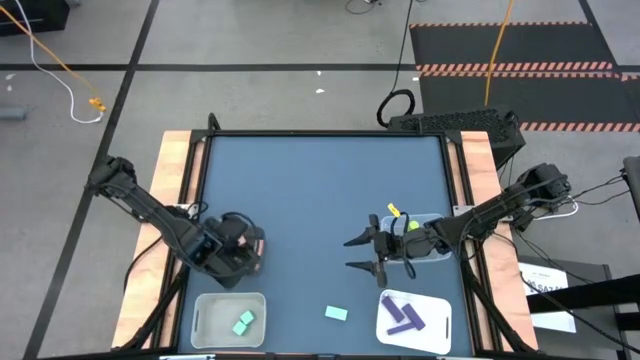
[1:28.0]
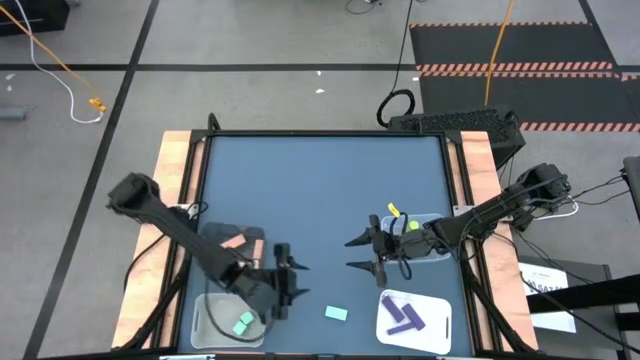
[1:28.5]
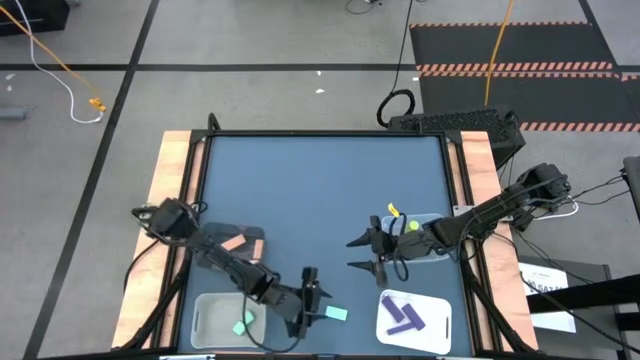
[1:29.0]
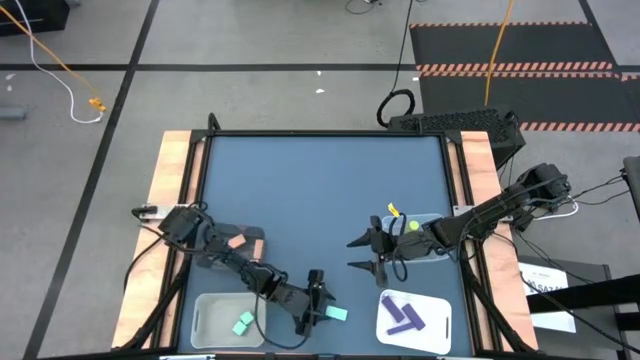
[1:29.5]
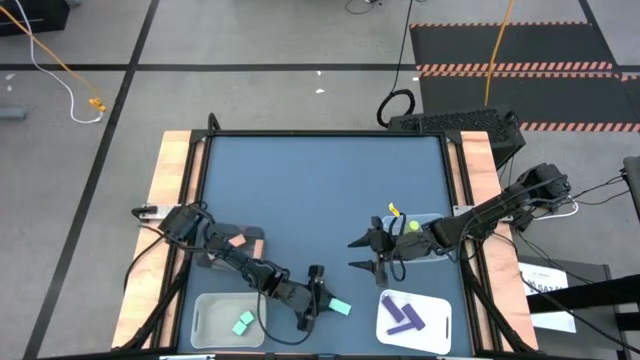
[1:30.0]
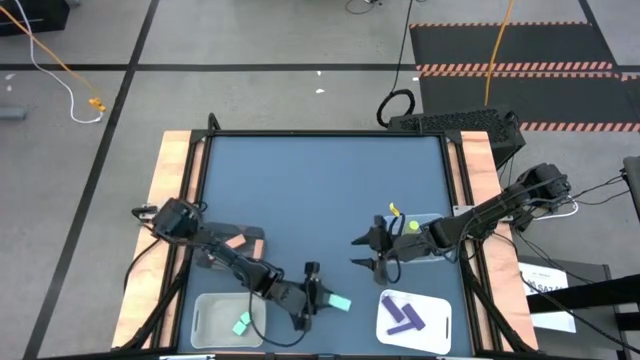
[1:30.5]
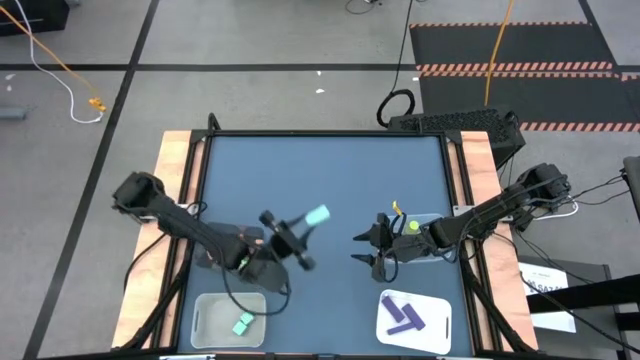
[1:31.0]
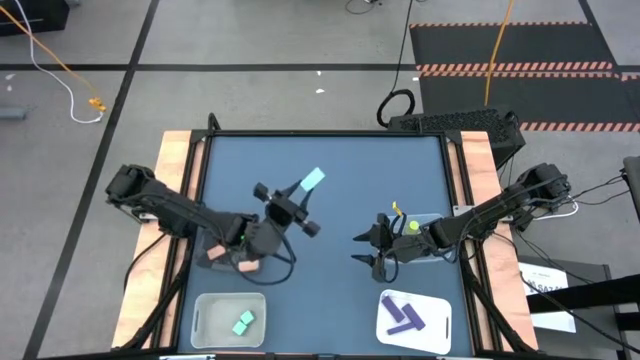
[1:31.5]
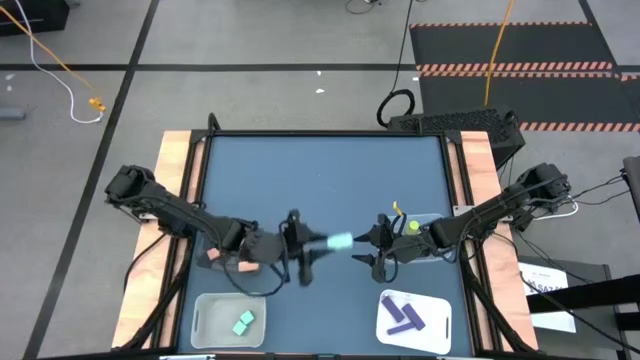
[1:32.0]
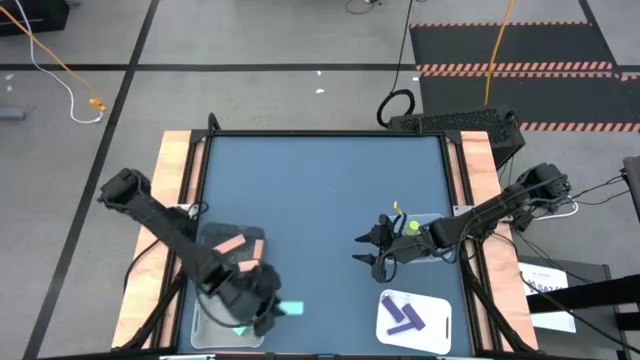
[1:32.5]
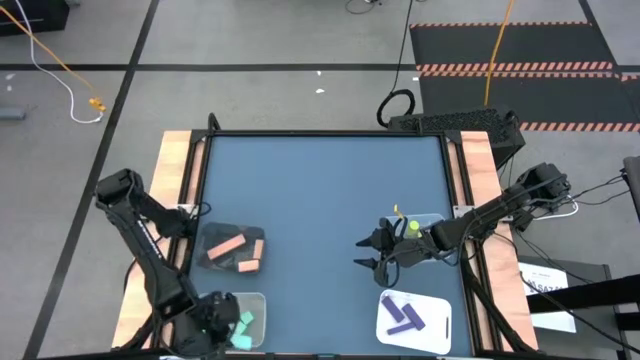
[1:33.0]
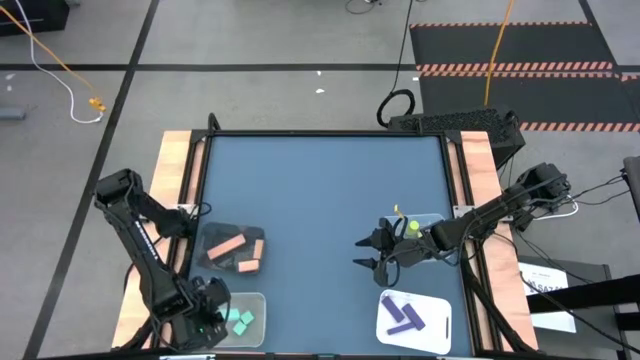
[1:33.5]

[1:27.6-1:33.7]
Task: Sort & place blocks by color
Put the blue block into the gray bin

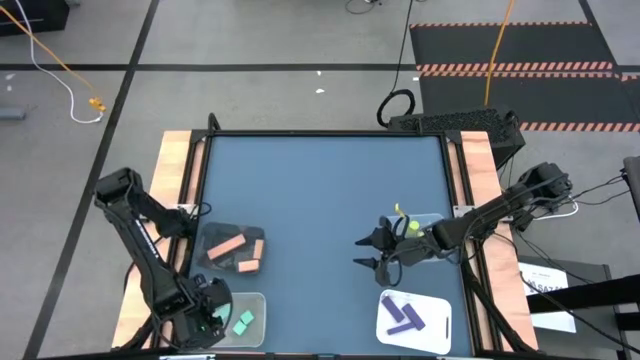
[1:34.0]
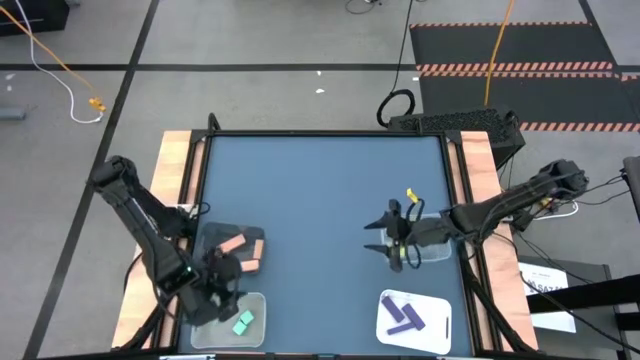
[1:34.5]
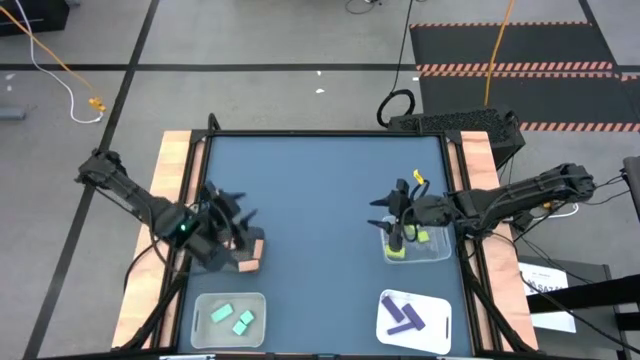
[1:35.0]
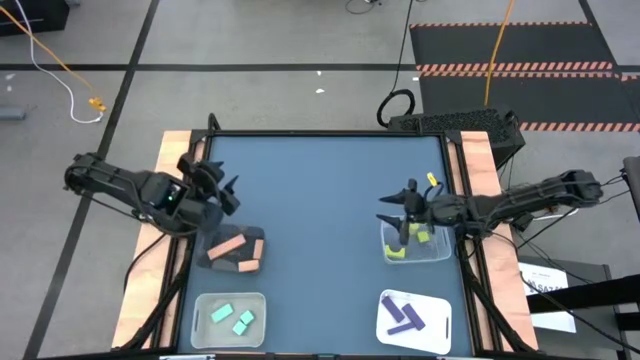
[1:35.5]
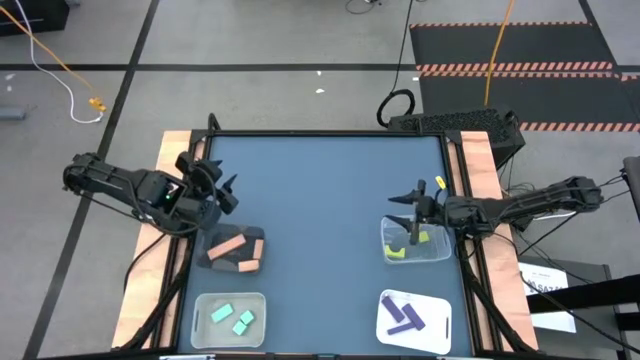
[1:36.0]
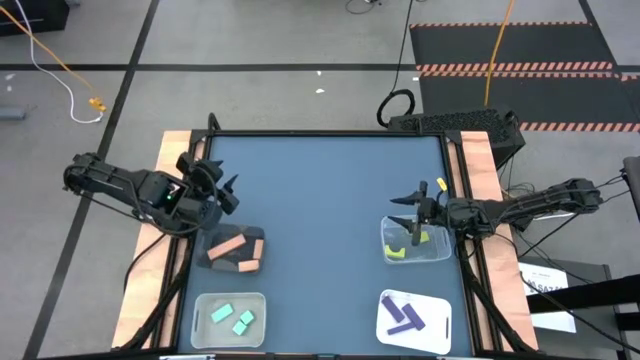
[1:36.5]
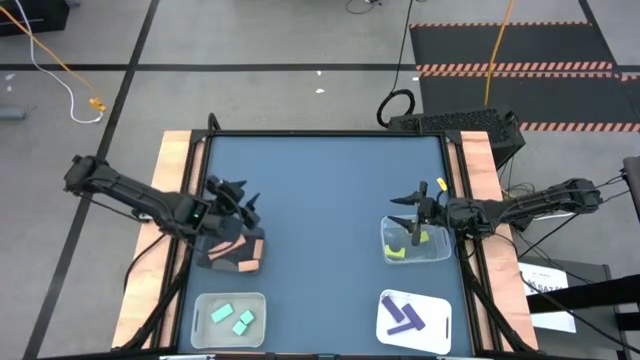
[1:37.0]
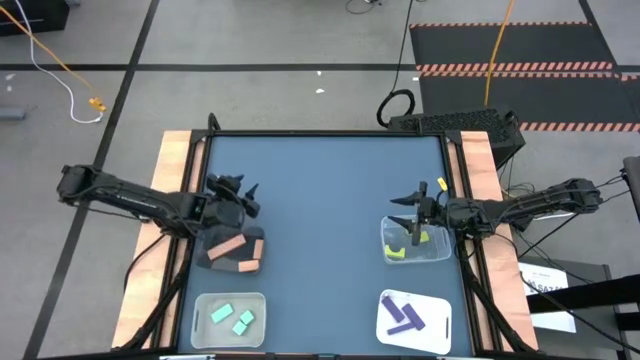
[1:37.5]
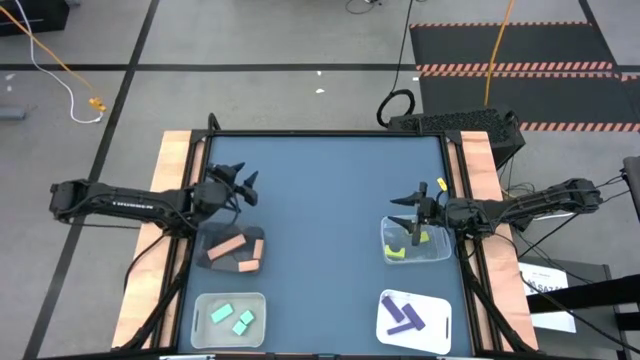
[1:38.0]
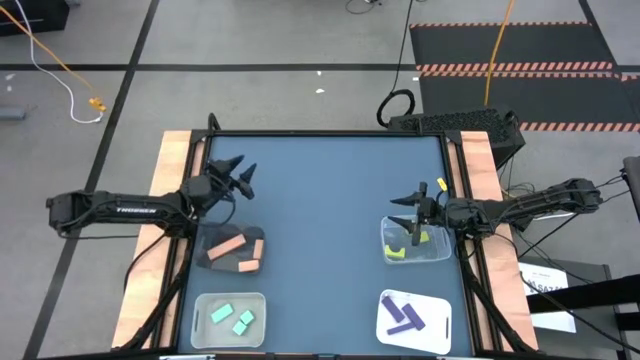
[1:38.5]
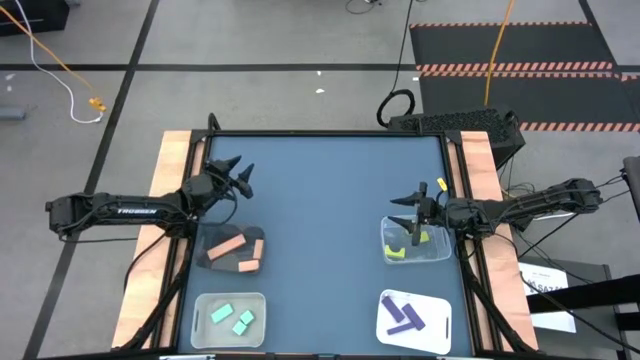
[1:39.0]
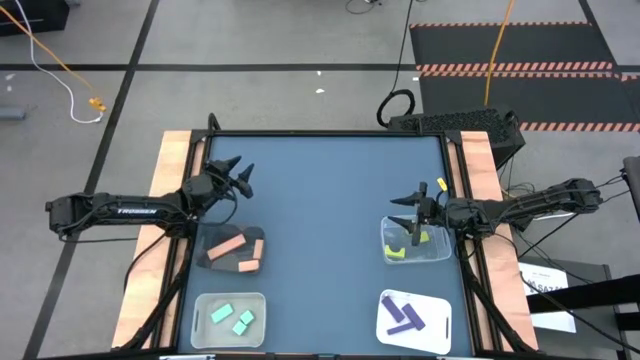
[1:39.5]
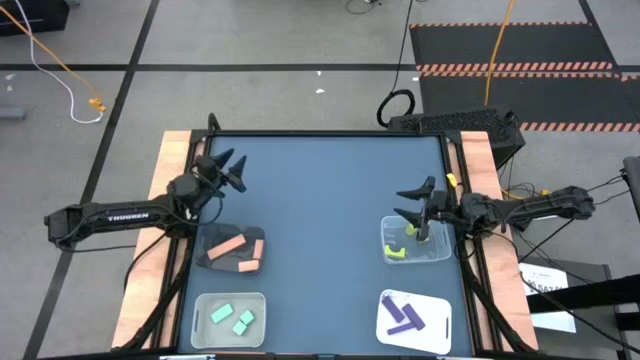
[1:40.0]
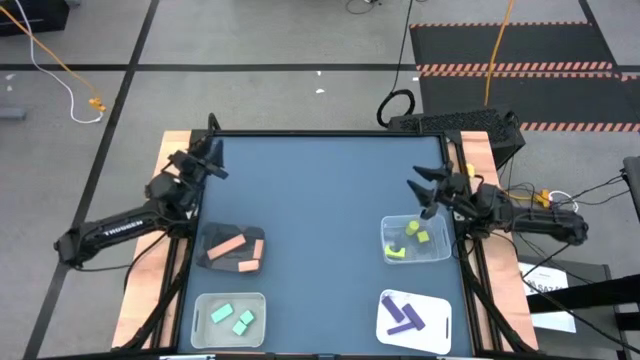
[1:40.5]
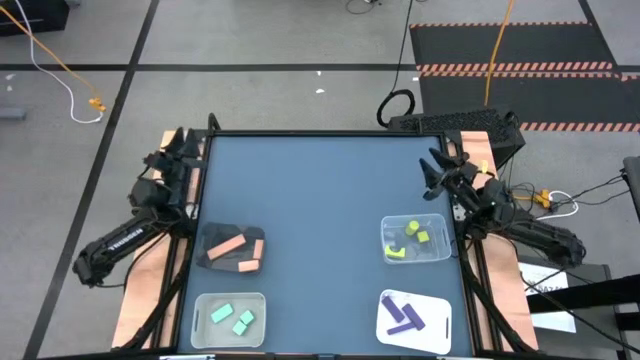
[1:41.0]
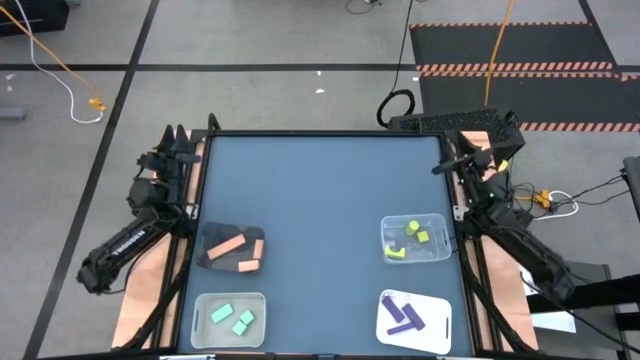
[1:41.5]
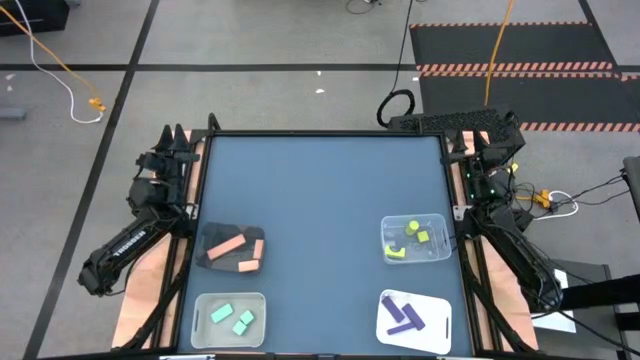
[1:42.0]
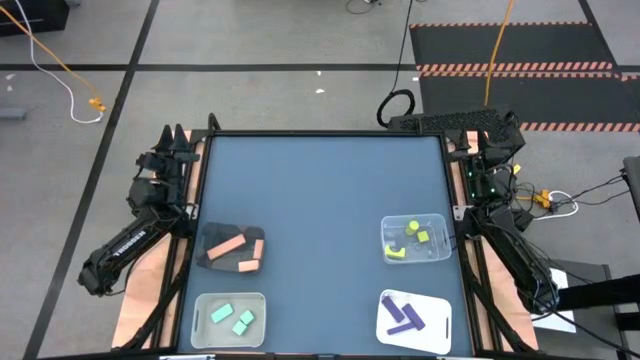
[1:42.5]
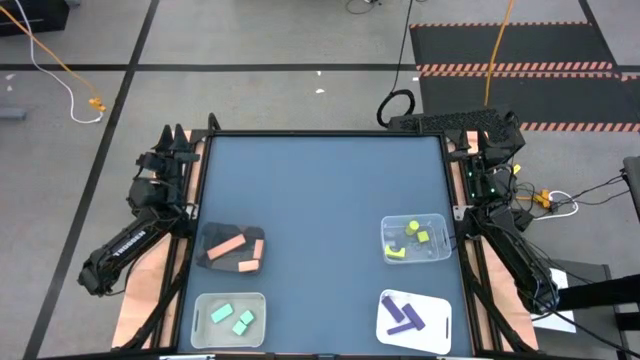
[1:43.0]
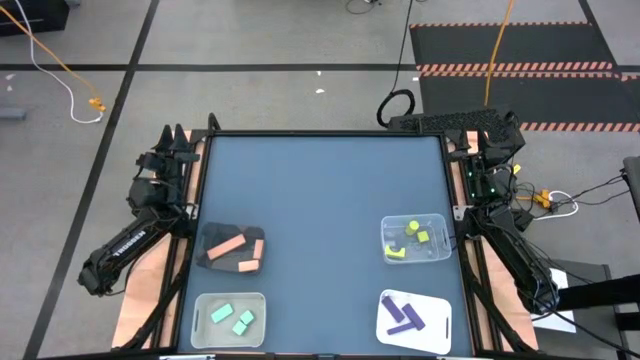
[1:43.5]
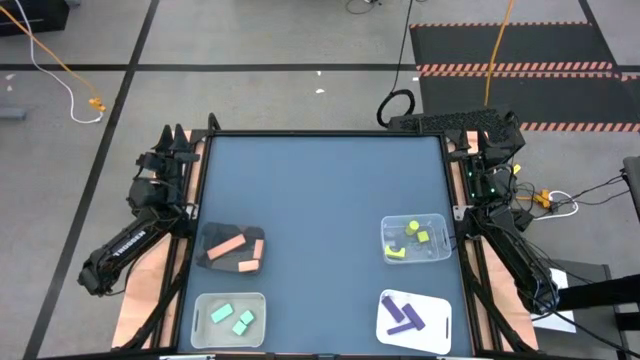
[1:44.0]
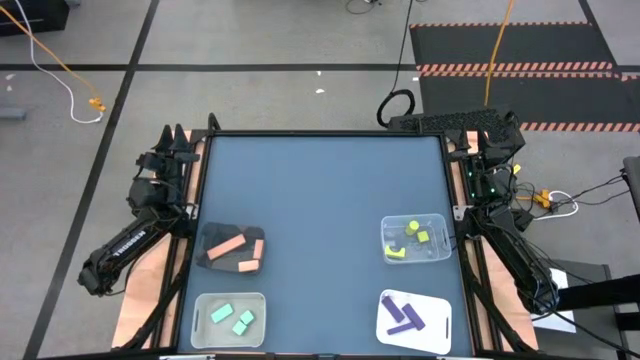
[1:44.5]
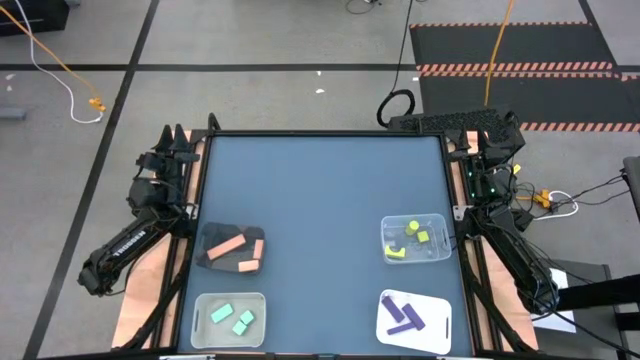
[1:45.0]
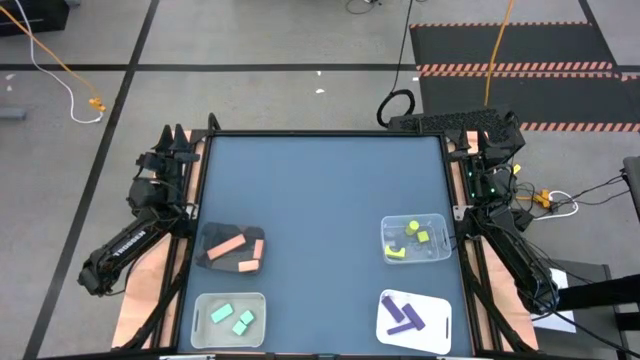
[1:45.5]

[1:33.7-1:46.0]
Return to Home Position

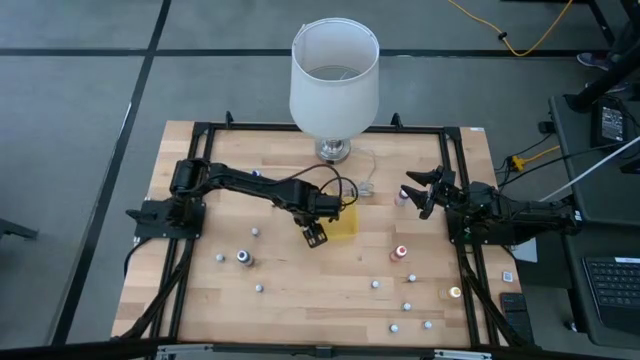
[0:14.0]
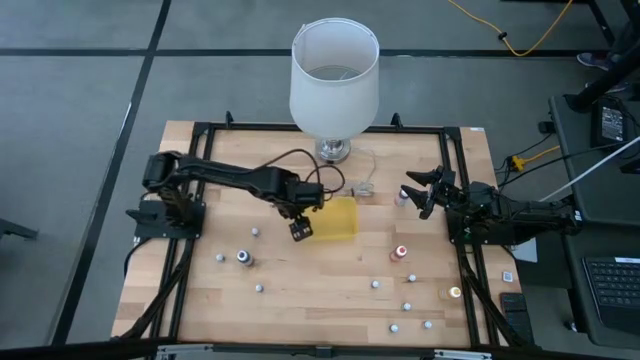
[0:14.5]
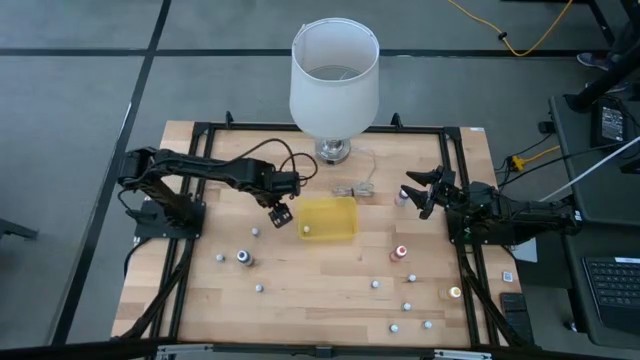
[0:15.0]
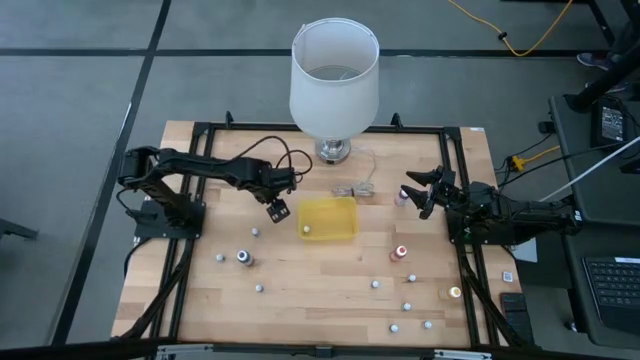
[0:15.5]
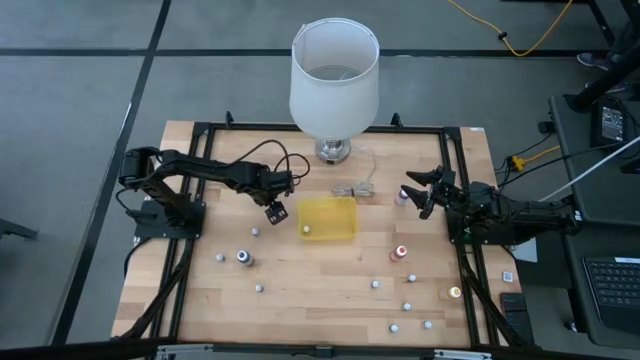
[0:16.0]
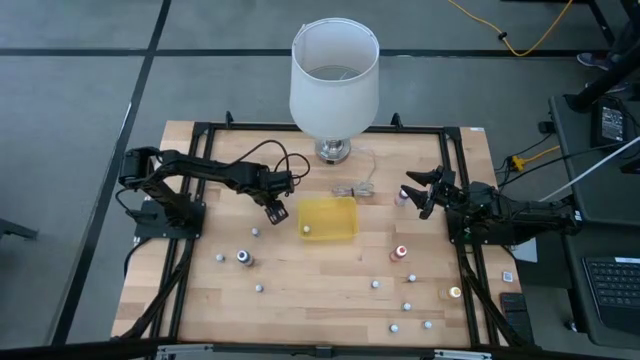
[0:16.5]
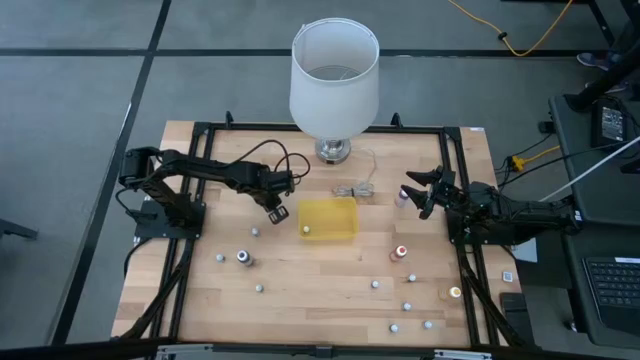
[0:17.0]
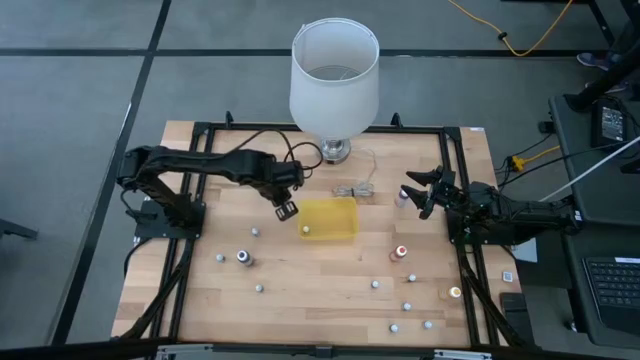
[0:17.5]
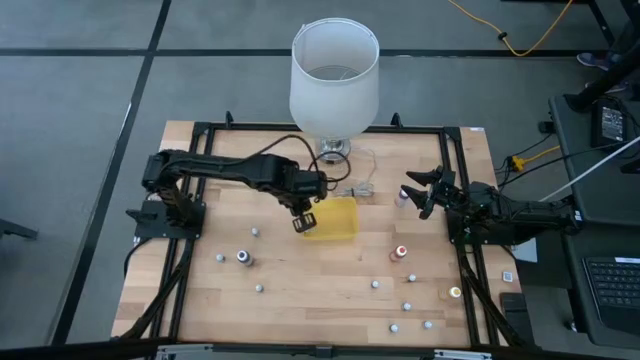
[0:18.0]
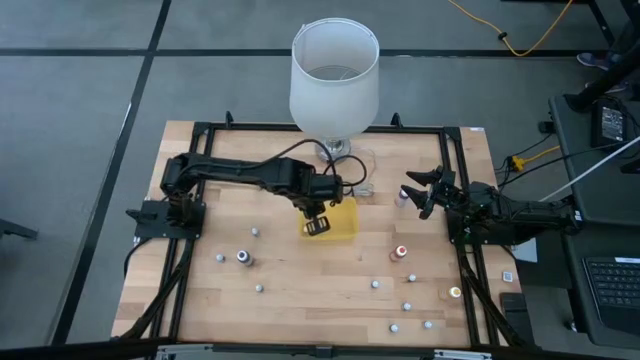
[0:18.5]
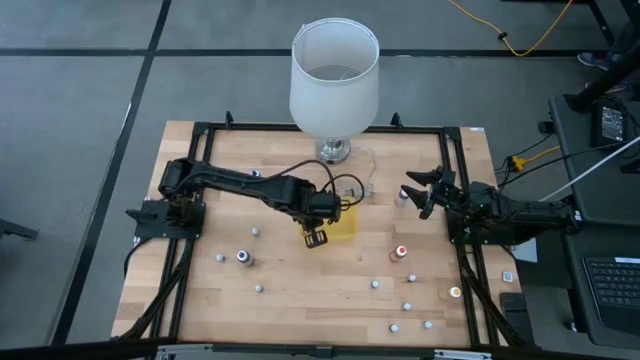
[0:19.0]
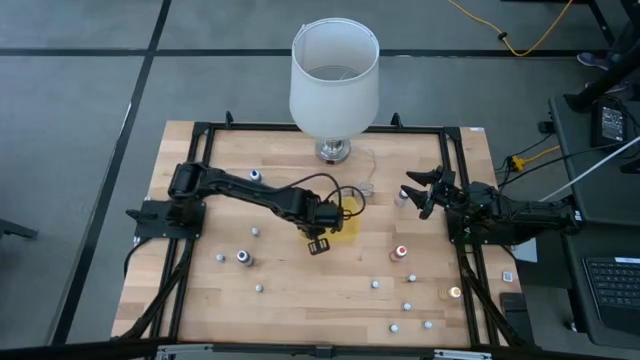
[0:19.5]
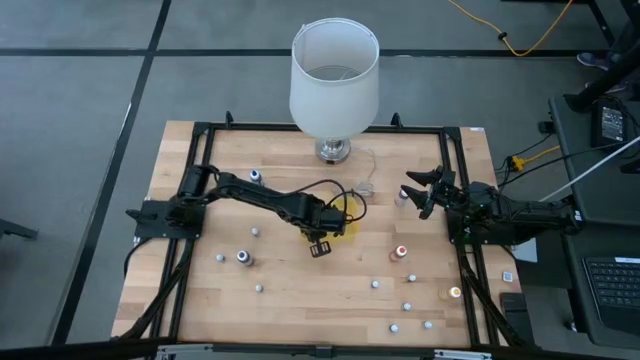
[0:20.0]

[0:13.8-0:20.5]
Task: Pick & Place food coloring
Put the top small blue food coloring bottle into the yellow bin
